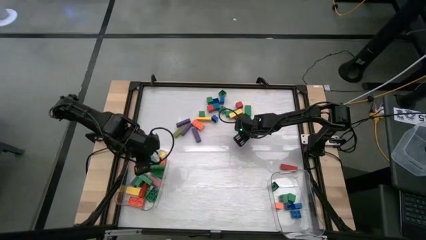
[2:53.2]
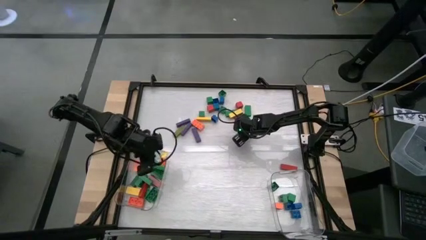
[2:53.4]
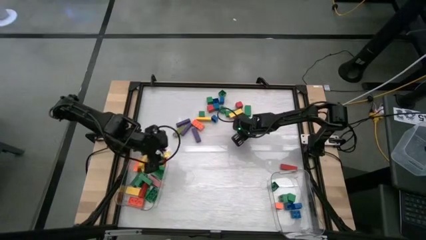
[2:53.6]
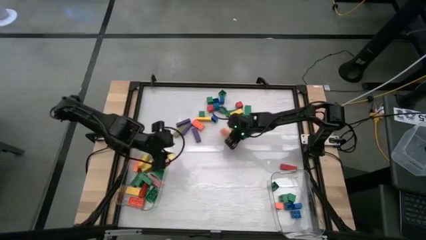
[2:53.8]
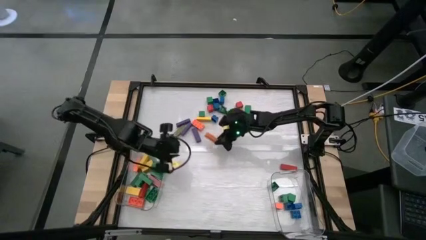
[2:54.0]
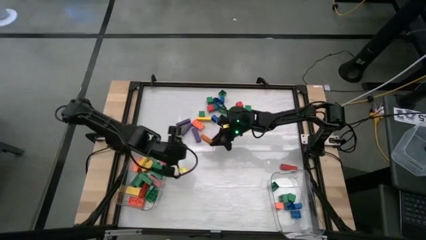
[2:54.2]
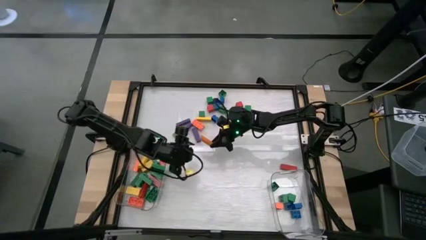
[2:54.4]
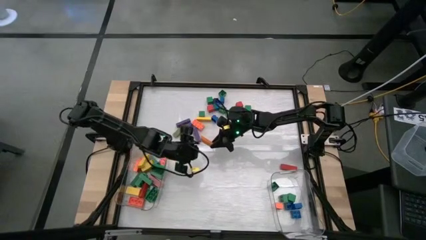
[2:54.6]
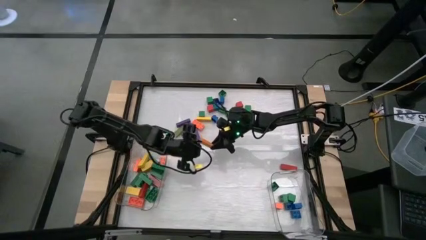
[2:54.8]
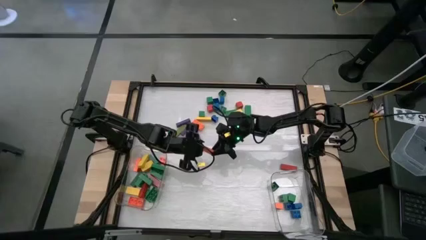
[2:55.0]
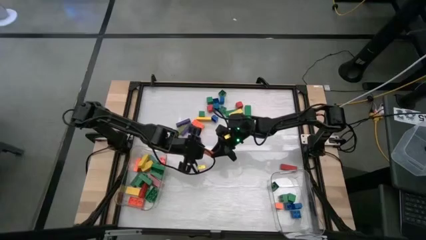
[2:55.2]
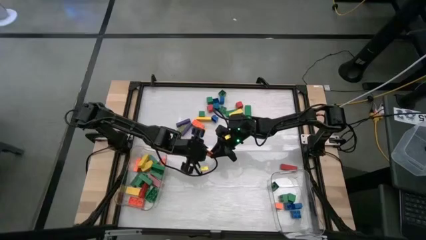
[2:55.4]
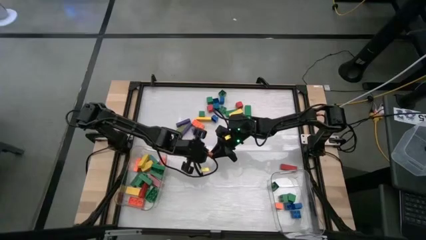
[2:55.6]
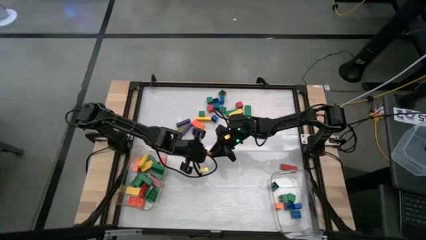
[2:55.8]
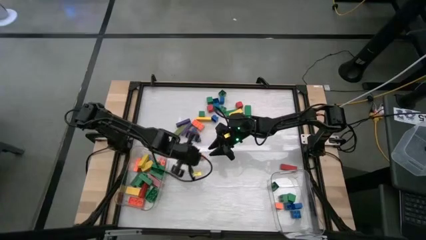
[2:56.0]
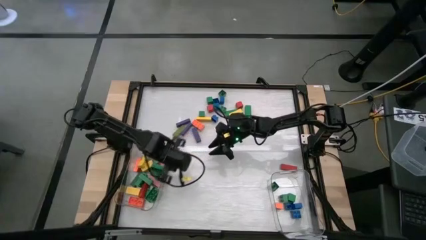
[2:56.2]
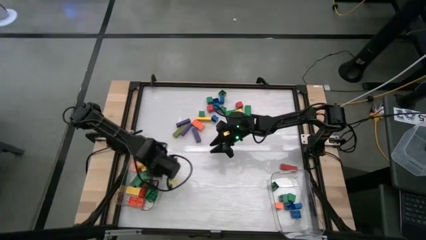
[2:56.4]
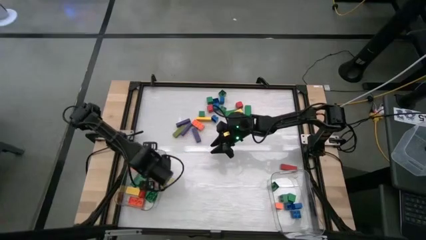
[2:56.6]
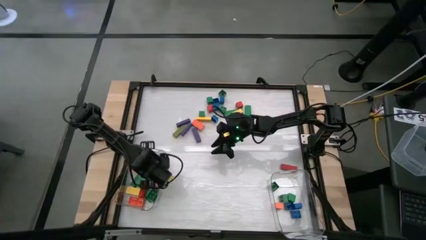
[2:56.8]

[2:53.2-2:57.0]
Task: Sort blocks by size
Put the large orange wooden block into the left transparent bin

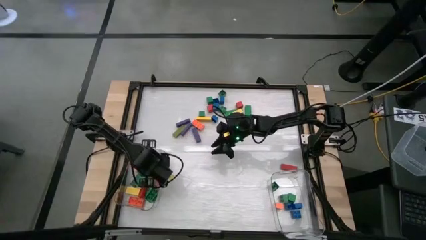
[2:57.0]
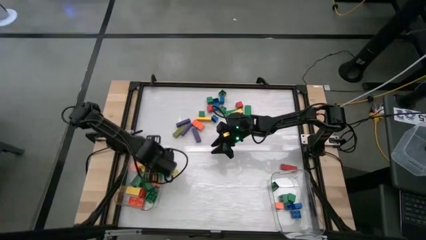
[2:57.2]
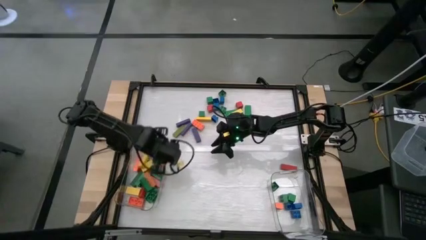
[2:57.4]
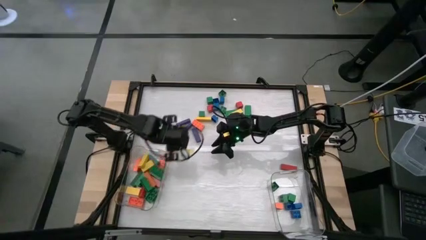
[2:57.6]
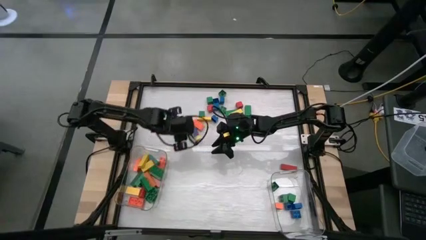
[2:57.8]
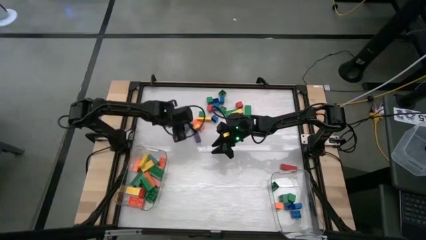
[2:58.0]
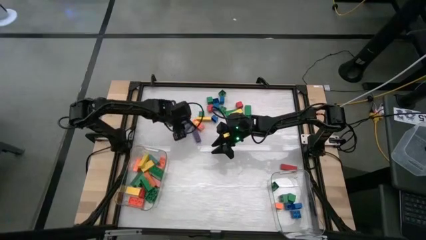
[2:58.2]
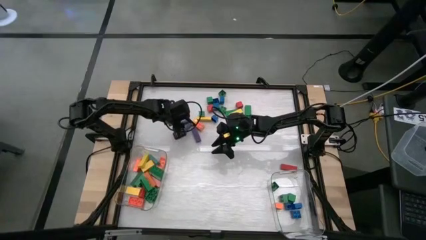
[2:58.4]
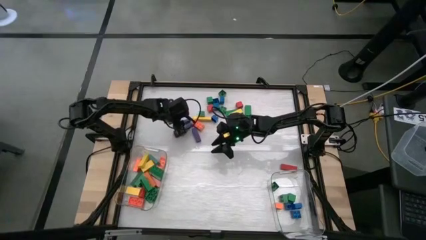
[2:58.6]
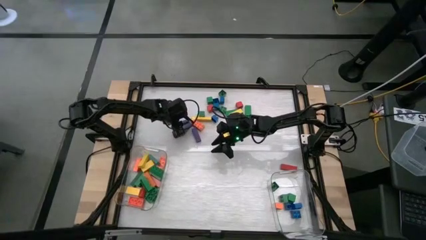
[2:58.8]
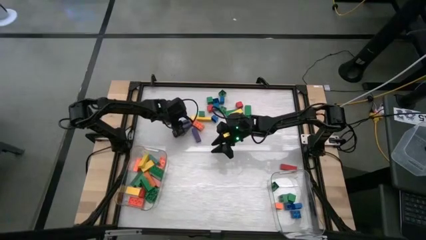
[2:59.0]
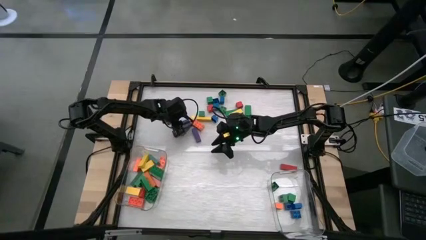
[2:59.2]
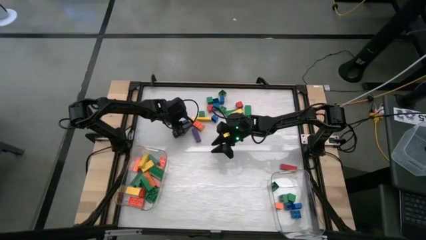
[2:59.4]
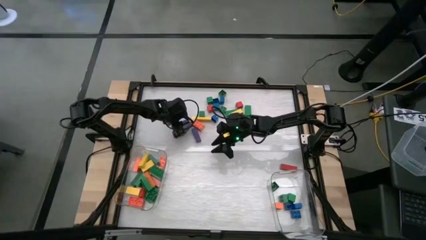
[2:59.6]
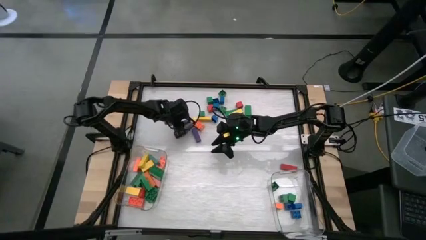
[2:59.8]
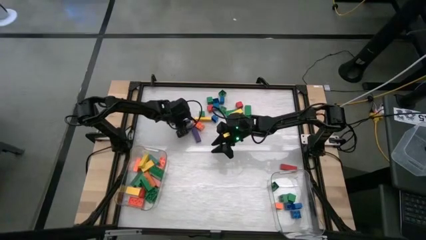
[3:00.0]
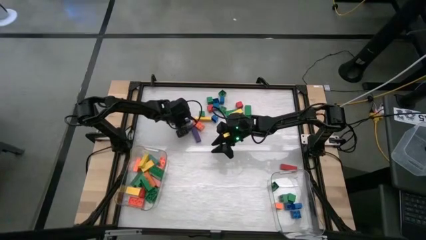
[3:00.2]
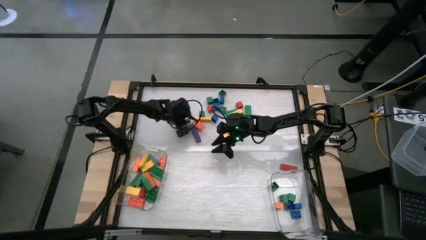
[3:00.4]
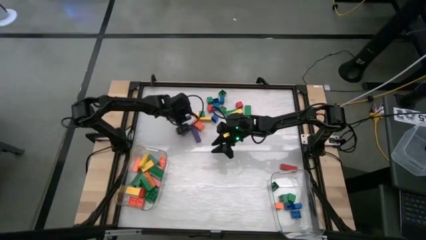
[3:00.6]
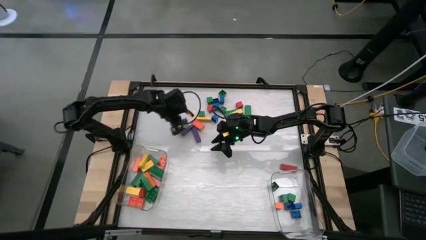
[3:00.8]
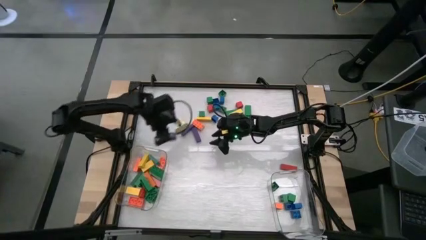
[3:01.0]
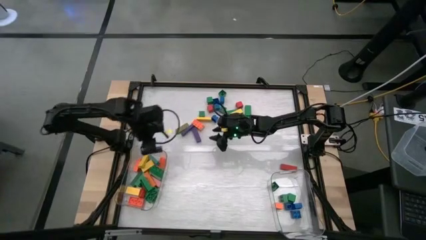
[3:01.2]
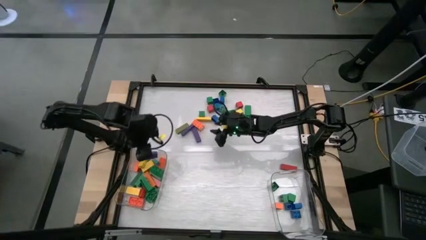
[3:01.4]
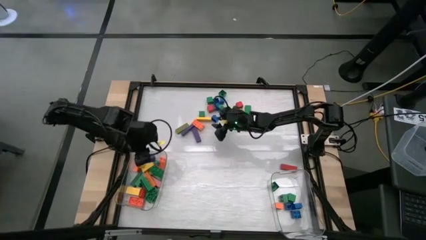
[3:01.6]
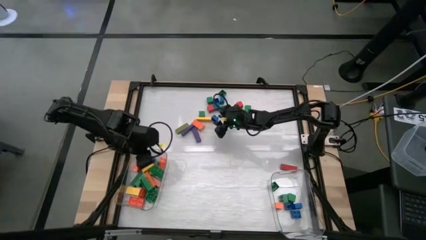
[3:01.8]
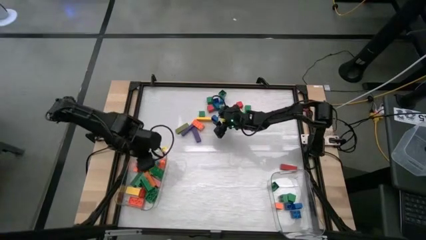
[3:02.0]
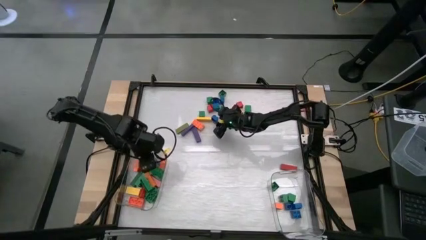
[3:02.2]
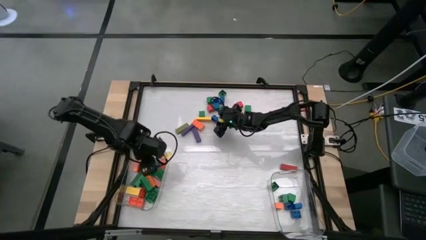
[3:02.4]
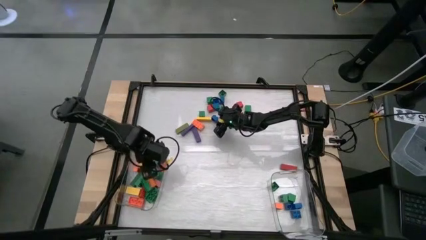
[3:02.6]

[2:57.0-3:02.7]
Put the large violet wooden block into the left transparent bin

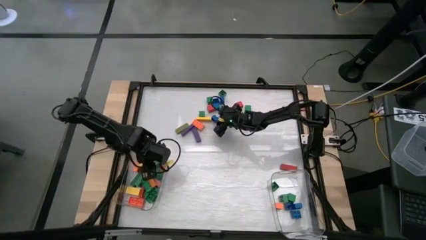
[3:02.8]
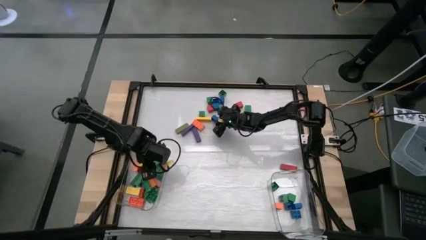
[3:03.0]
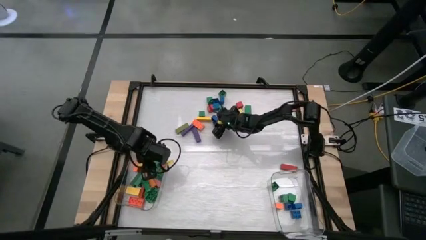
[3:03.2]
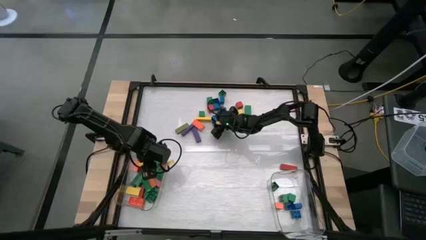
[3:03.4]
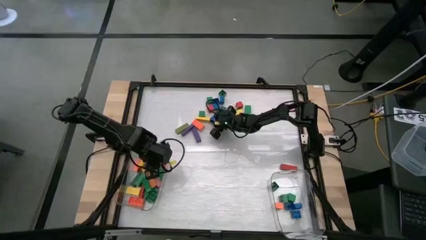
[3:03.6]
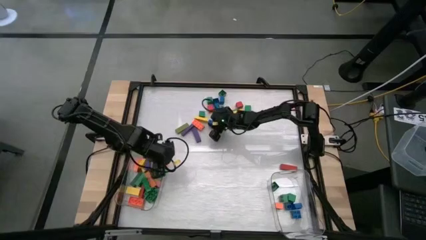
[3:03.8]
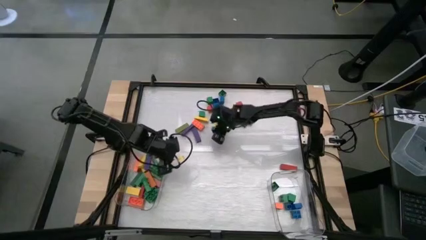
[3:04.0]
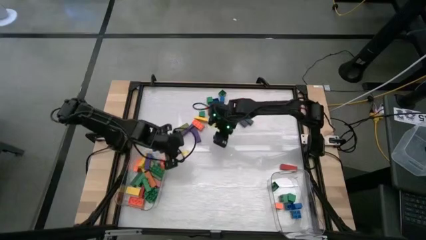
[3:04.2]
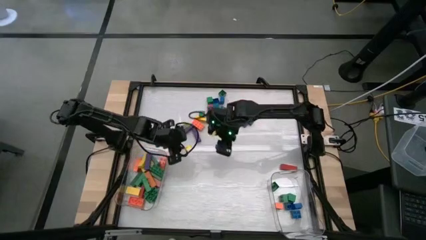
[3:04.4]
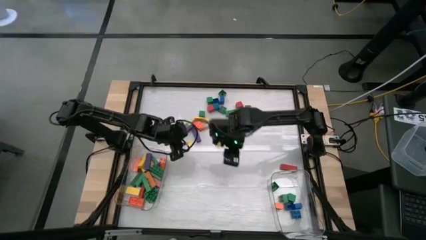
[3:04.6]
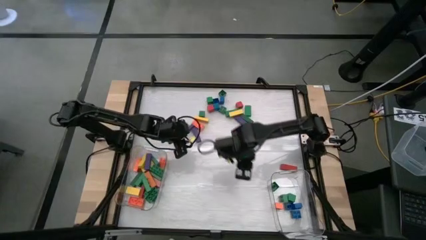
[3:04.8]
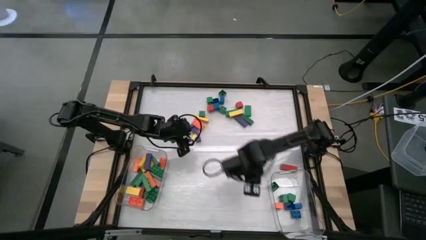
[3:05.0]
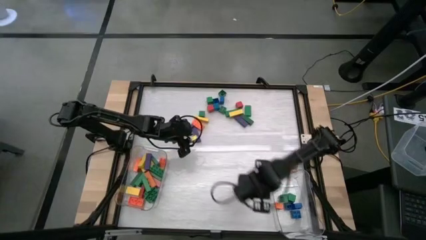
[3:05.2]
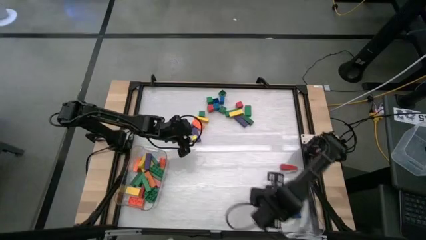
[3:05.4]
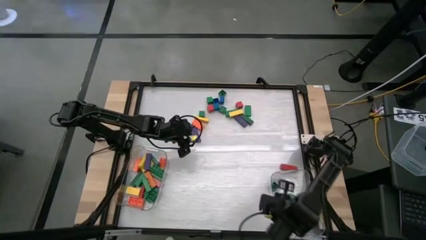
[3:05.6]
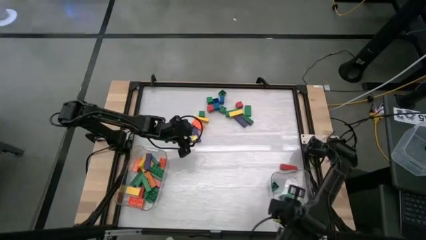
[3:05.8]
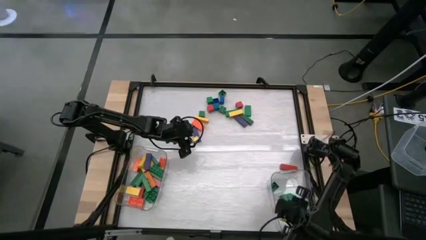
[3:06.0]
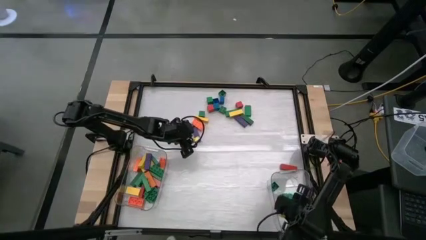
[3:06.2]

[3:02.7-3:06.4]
Put the small blue game piece into the right transparent bin

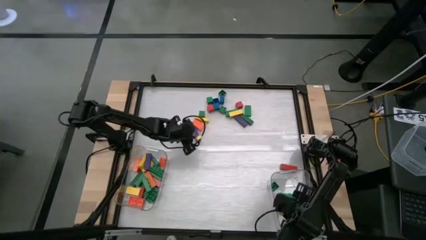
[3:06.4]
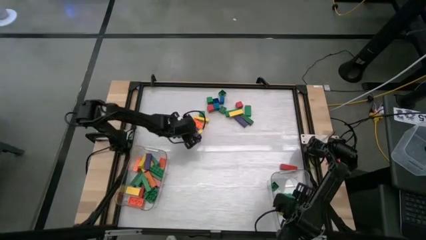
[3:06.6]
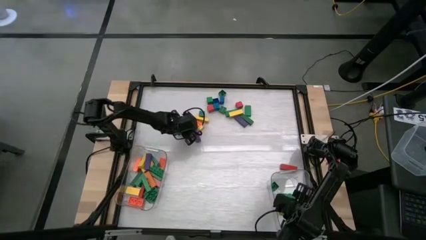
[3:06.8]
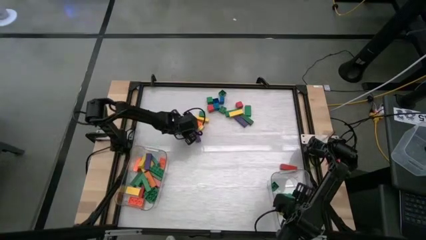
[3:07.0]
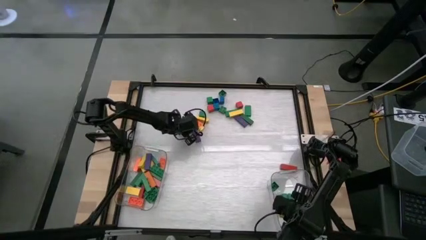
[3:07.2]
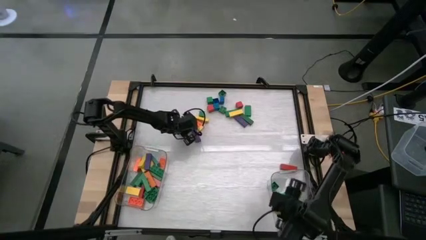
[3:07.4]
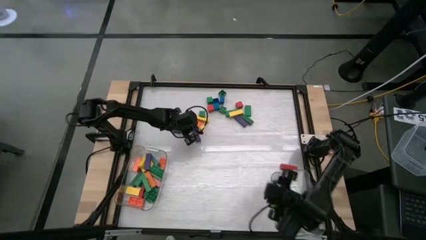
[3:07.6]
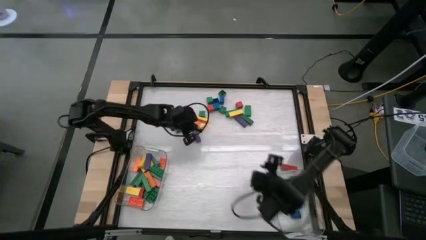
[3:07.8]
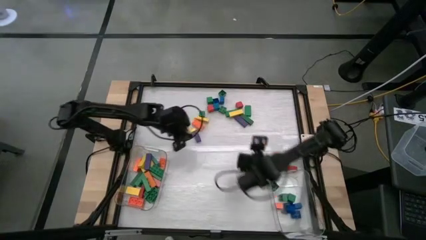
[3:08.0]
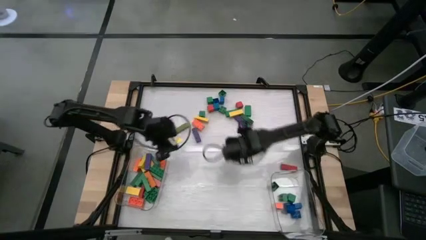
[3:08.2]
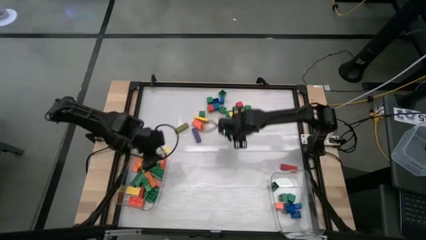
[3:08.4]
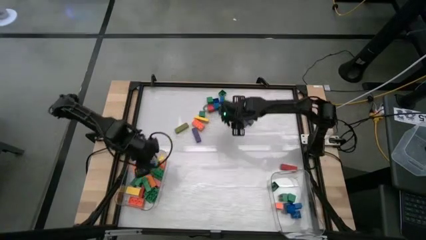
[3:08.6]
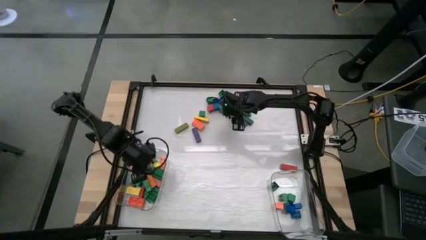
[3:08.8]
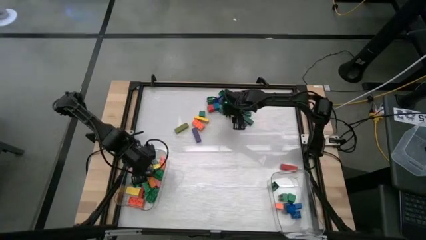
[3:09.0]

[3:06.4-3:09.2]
Put the large violet wooden block into the left transparent bin
